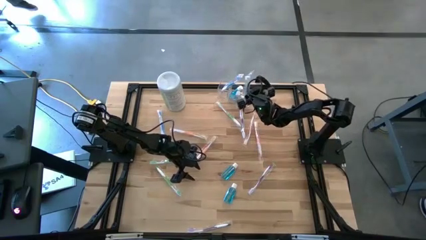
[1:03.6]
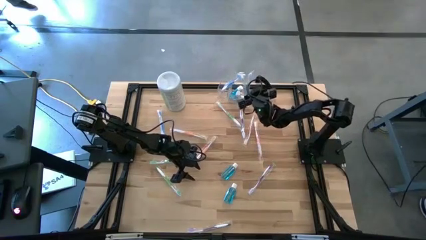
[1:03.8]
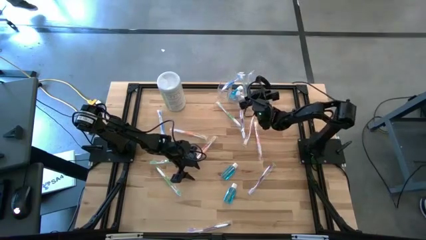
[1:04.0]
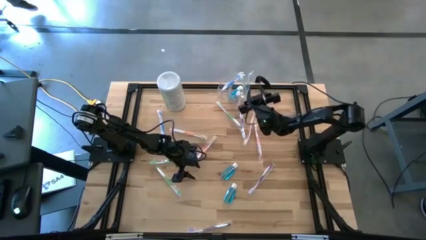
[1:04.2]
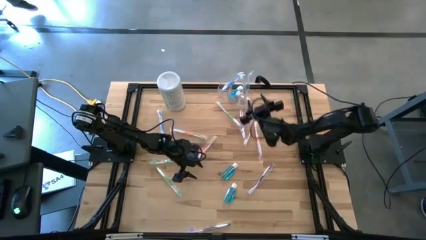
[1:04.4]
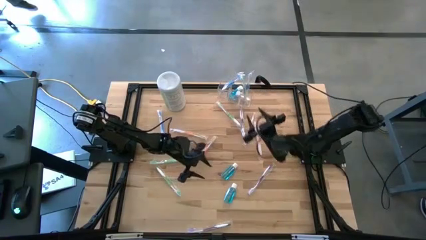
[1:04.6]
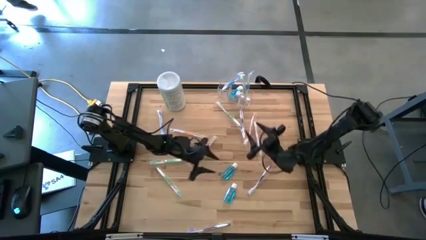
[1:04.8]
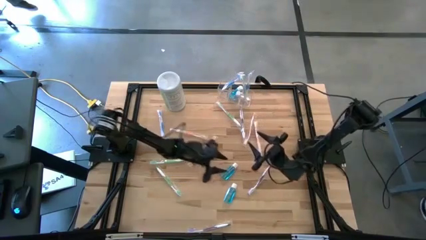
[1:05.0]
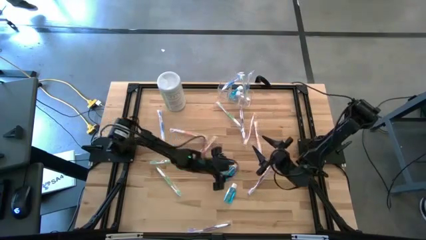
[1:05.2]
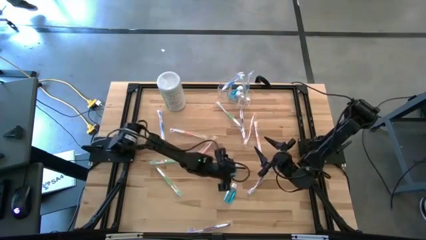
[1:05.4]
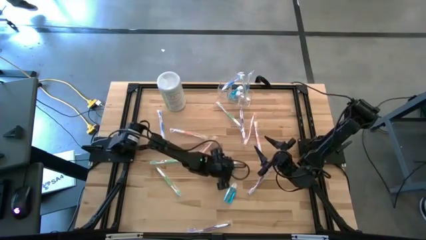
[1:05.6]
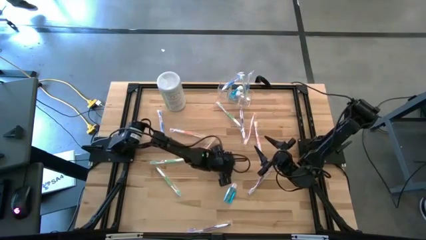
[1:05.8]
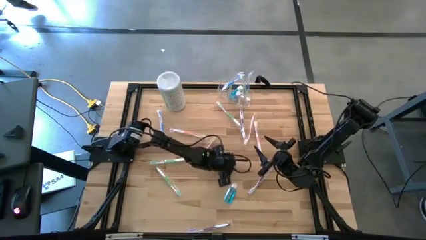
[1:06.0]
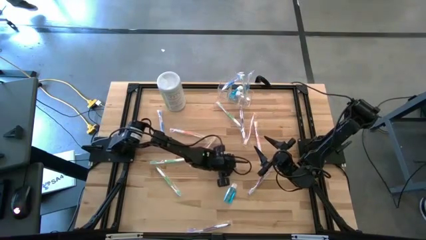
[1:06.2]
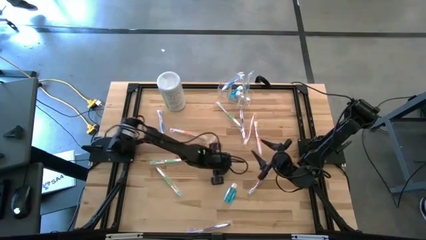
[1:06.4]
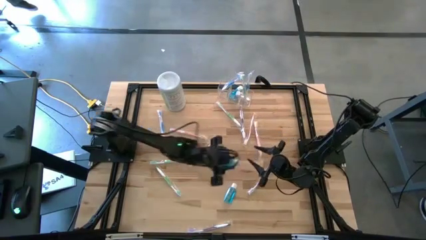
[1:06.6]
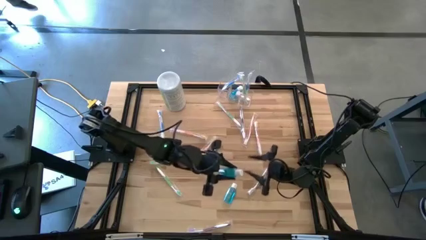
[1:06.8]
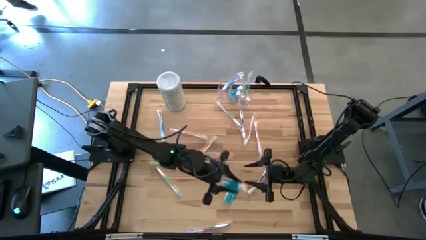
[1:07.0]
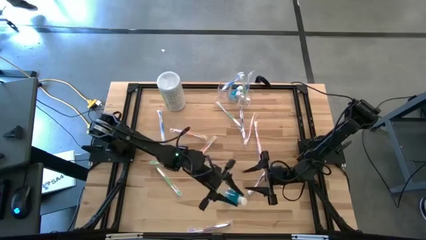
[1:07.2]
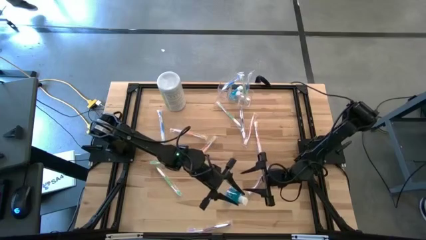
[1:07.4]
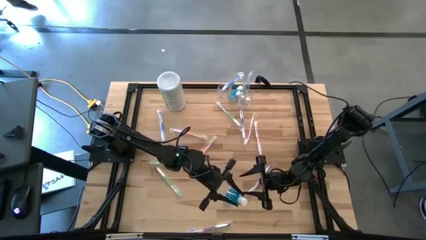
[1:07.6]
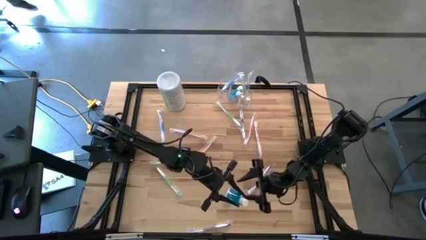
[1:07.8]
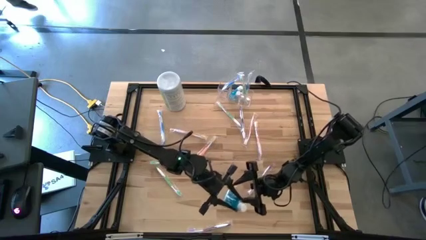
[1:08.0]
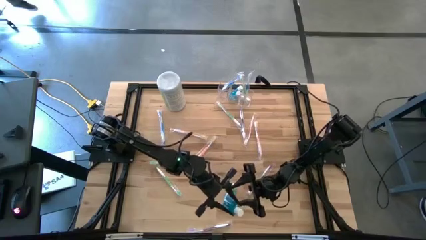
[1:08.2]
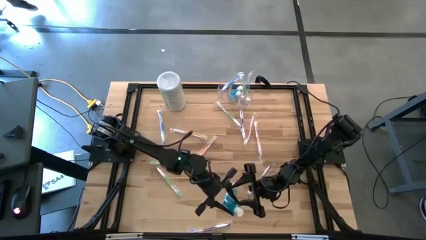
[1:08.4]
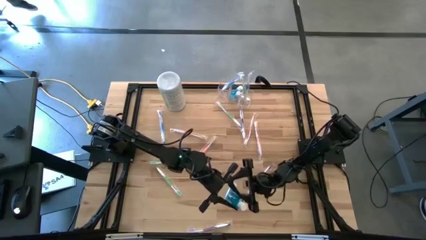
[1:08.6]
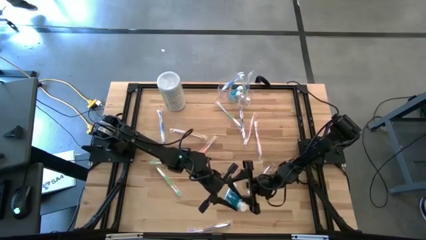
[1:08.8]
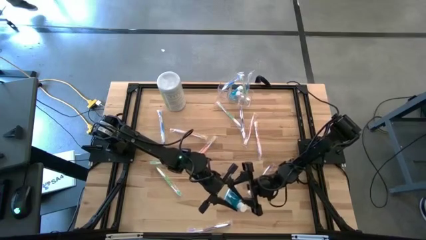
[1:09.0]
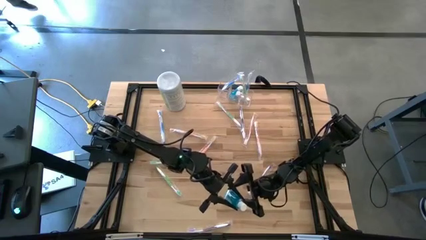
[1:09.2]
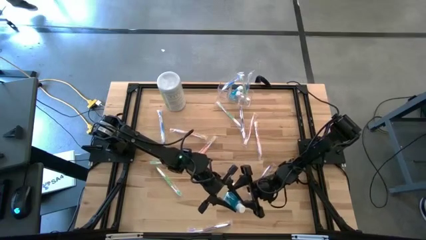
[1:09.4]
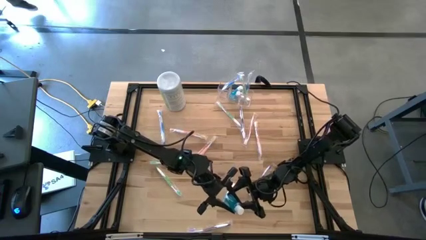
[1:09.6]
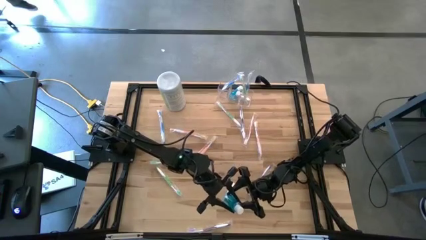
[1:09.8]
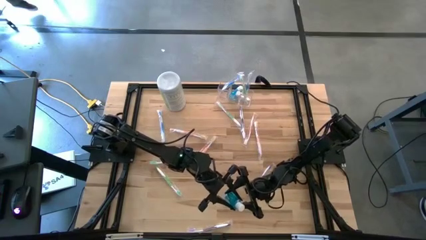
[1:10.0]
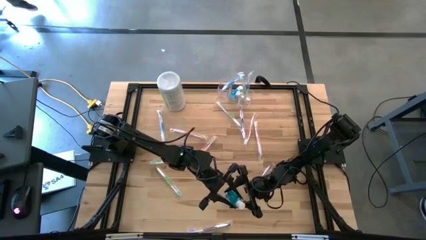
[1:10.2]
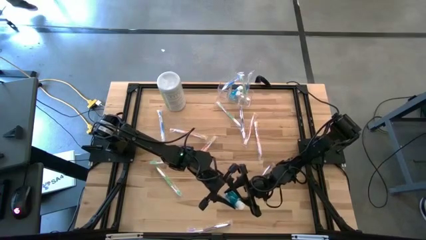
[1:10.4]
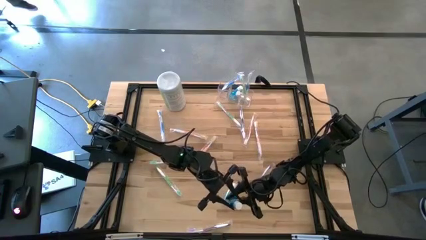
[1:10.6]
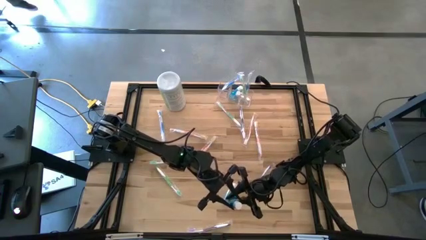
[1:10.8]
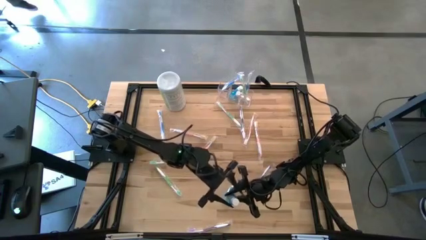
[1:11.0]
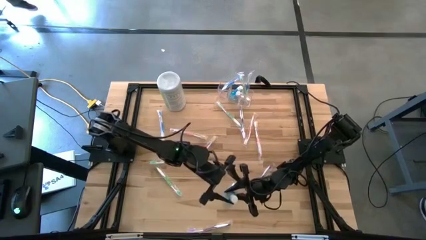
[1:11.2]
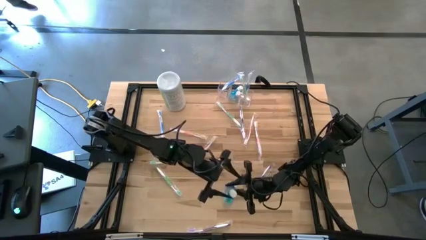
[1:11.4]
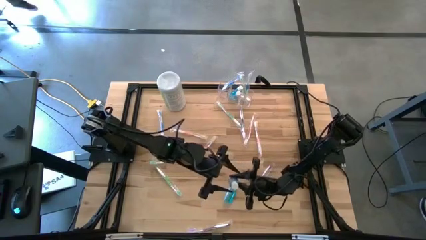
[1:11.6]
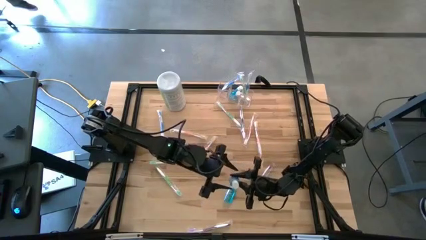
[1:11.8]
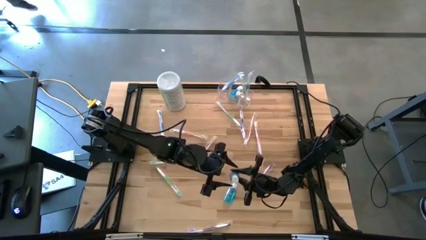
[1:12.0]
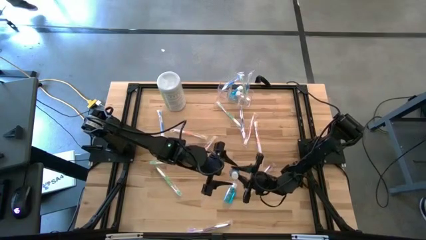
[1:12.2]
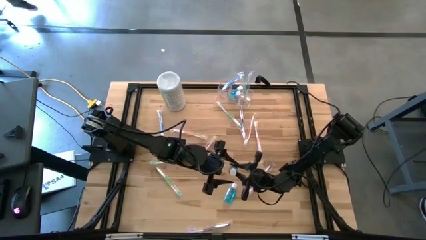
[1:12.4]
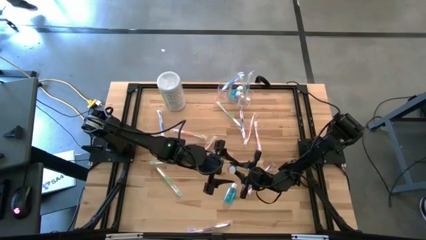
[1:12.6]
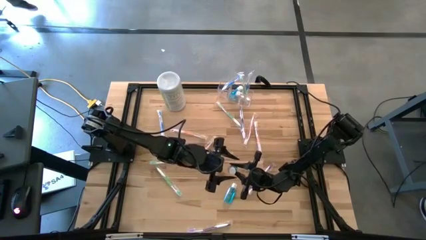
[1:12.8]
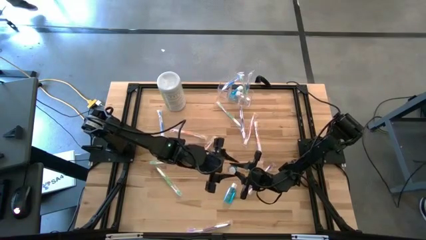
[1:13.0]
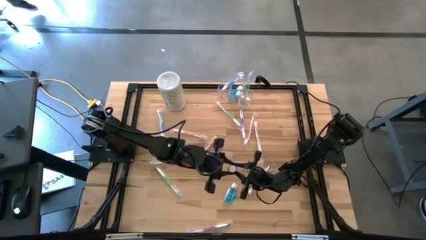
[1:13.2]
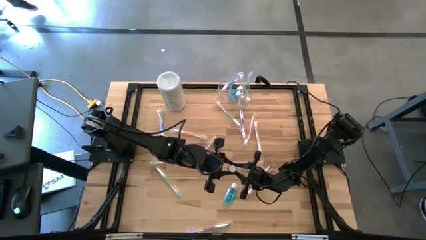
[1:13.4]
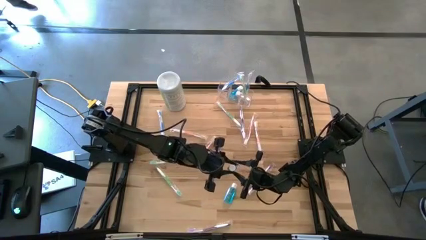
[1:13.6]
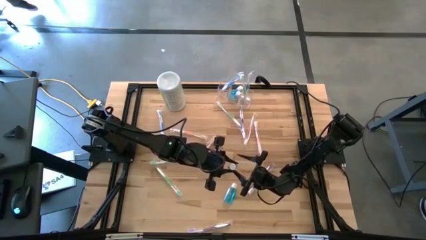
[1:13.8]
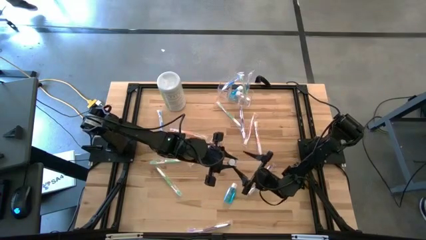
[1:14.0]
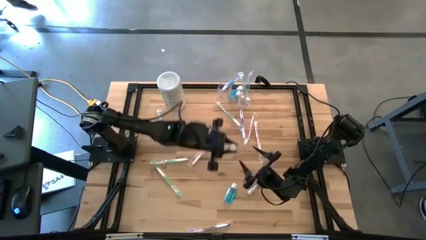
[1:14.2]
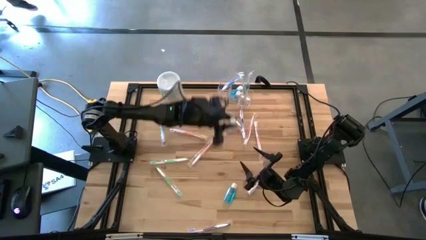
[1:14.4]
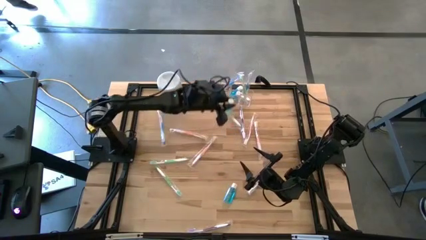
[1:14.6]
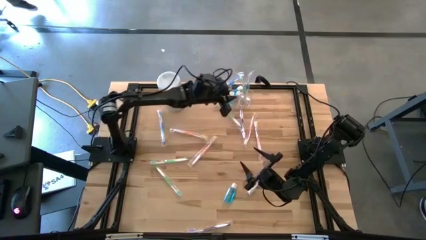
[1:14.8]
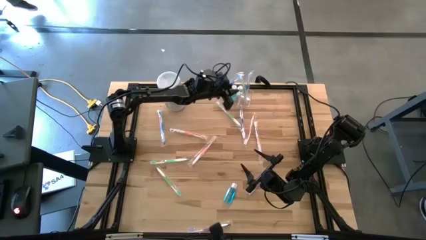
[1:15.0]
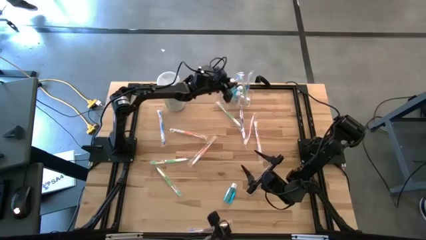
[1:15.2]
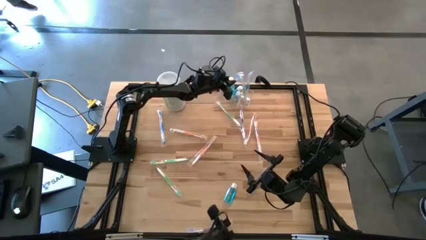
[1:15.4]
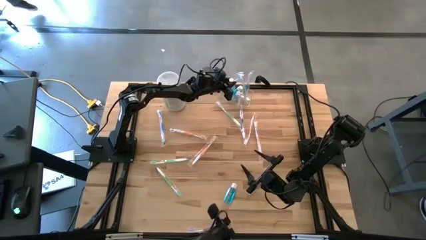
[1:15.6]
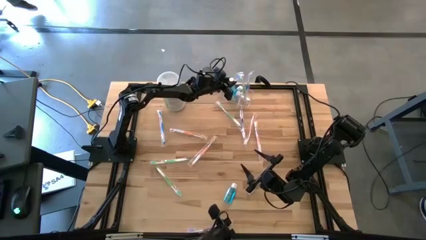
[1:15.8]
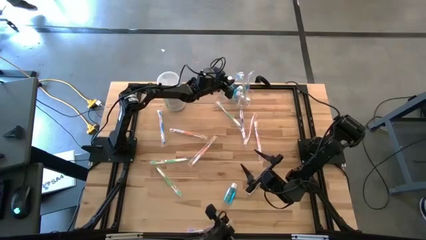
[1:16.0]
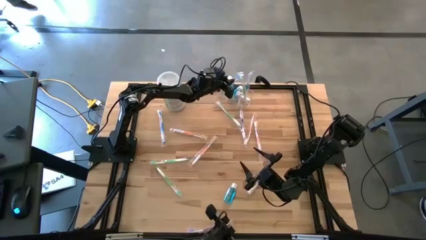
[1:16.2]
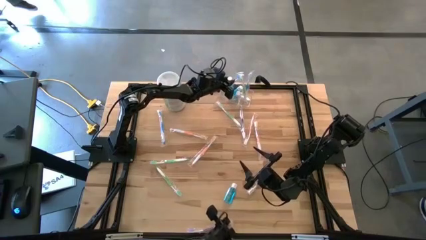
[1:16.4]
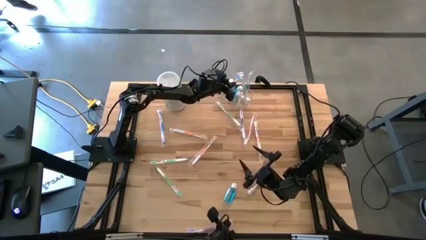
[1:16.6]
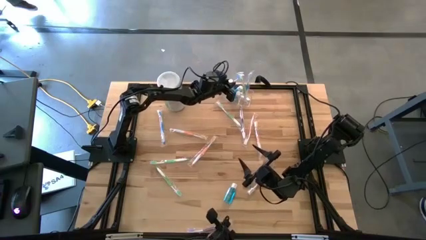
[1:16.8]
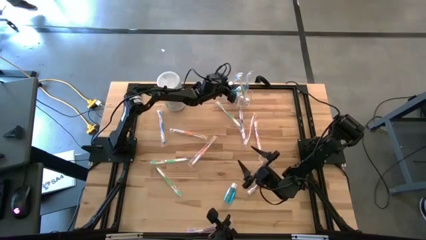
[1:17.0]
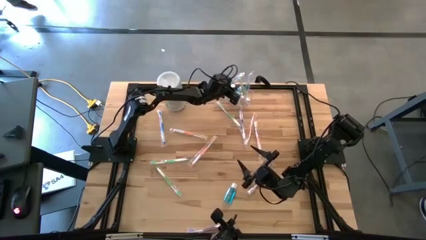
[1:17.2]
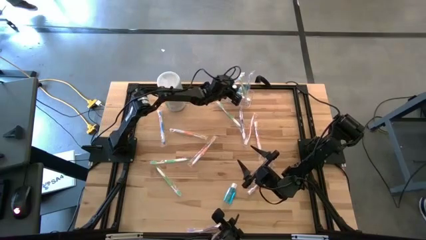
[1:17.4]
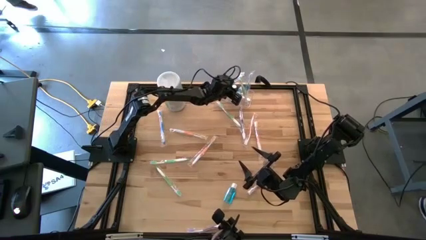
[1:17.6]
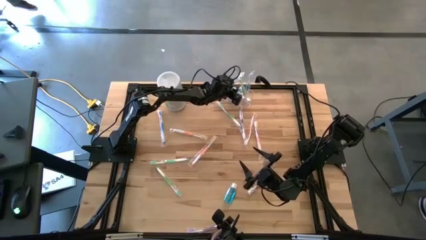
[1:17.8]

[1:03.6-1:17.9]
Task: Pick & Place toothbrushing station
Put the blue mouthwash into the transparent organizer

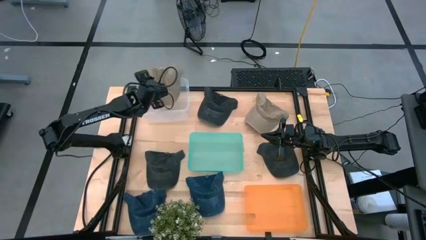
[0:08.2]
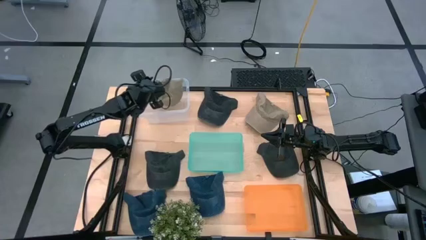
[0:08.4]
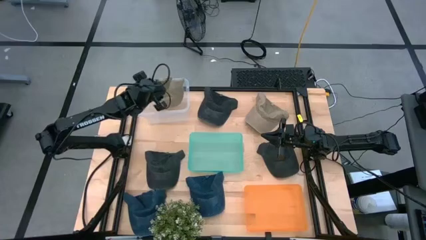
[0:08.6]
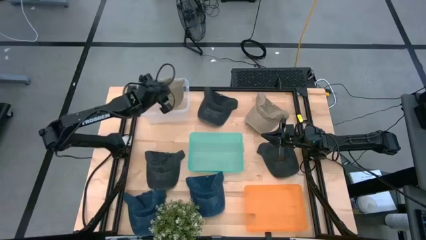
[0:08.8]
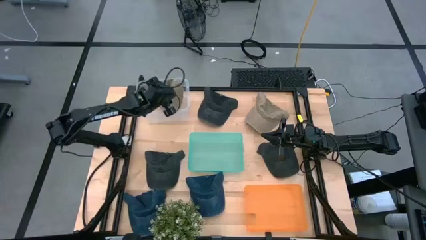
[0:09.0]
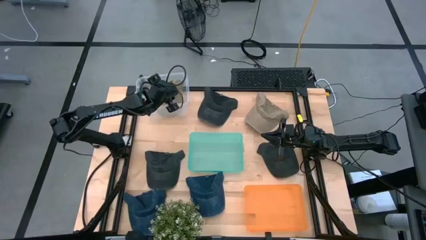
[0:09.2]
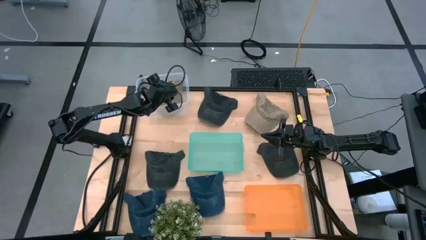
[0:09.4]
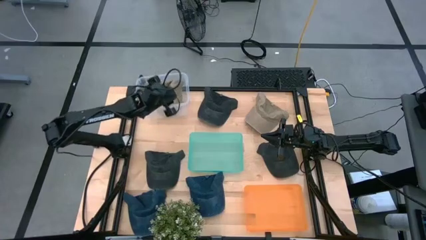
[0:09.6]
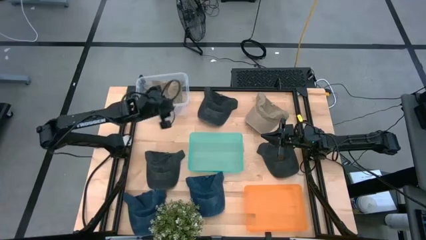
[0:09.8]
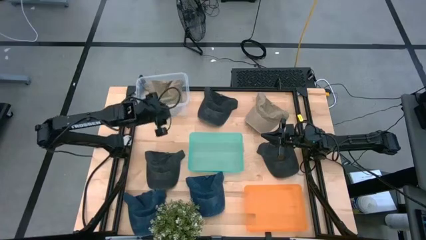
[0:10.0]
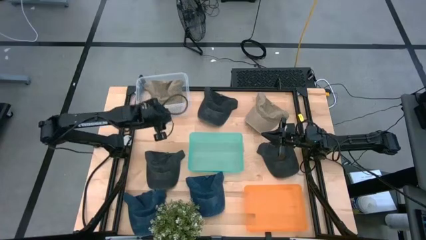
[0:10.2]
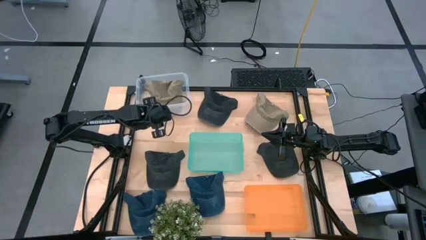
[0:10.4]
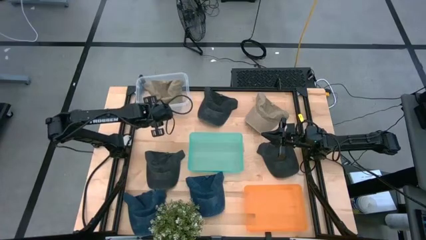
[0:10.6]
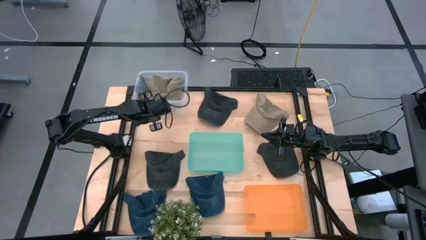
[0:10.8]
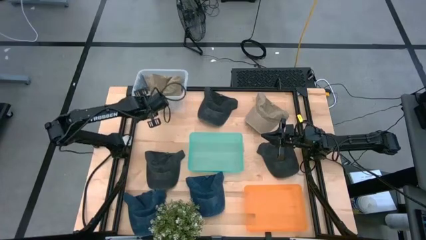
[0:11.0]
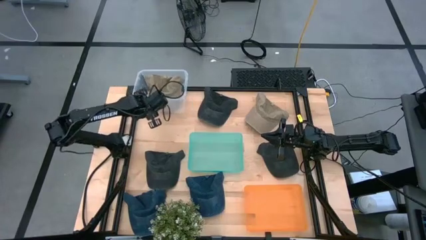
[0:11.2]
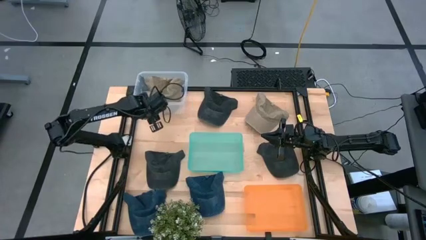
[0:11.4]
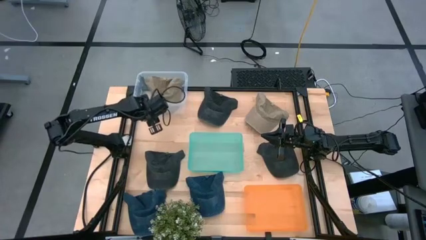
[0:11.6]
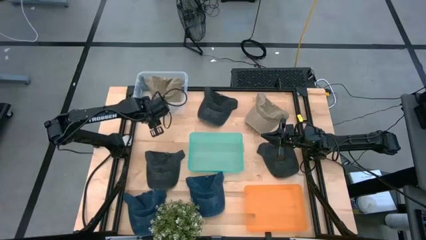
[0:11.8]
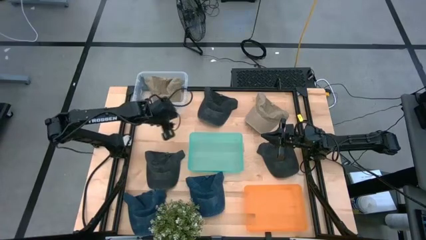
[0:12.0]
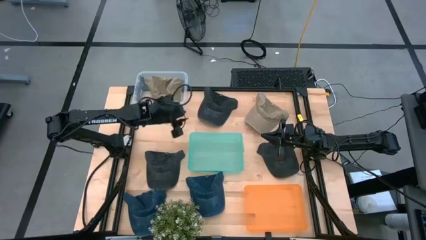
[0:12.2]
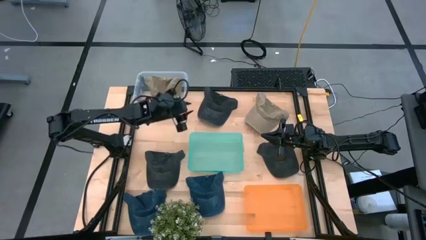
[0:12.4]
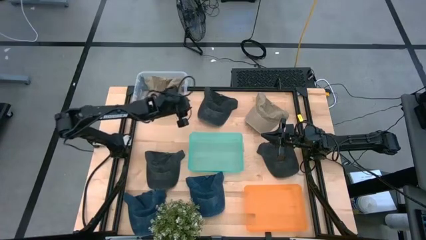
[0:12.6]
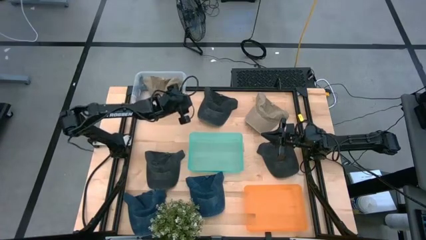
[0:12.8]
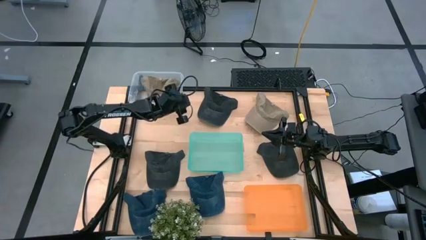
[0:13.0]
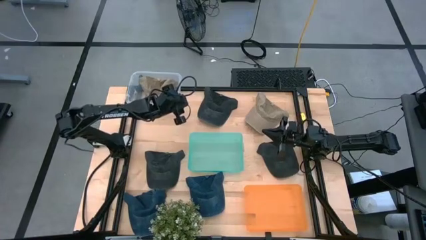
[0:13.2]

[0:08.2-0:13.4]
Task: Pick & Place hat
Adjust the transparent bin
